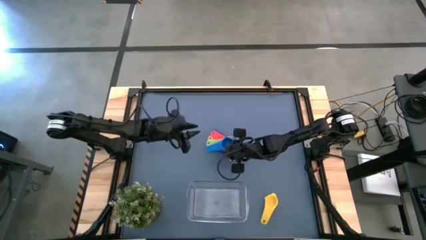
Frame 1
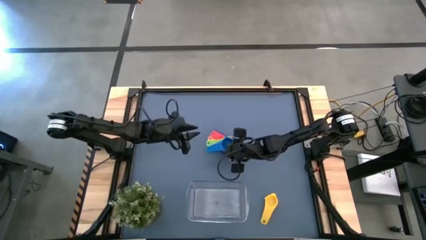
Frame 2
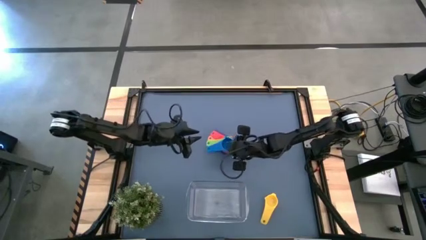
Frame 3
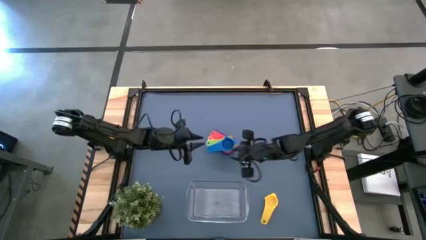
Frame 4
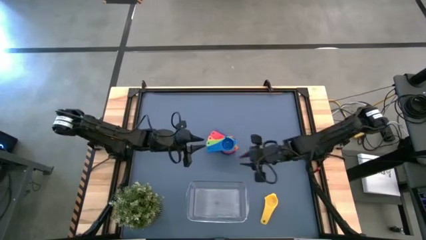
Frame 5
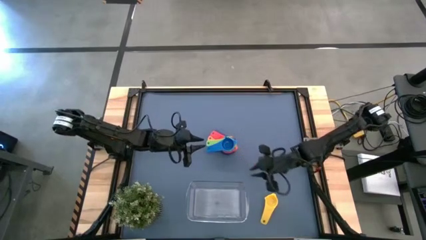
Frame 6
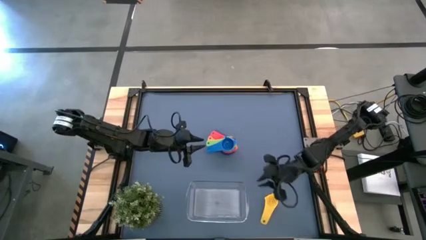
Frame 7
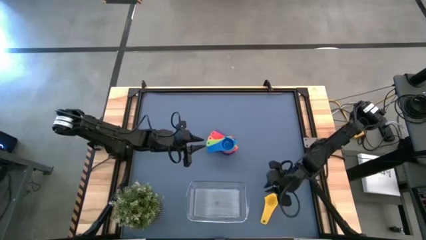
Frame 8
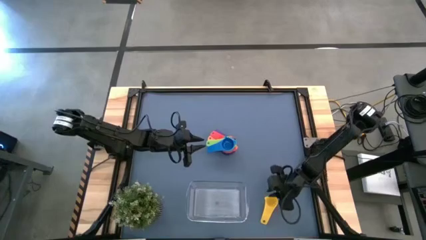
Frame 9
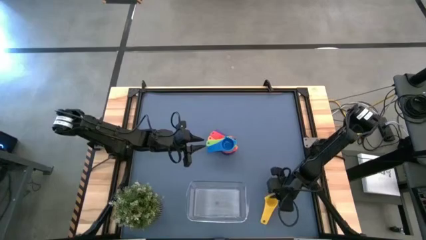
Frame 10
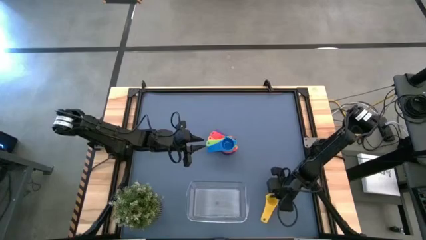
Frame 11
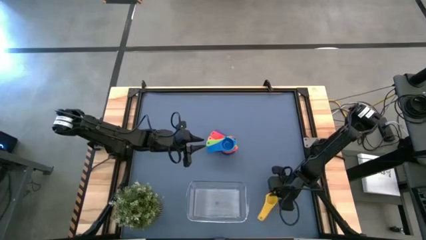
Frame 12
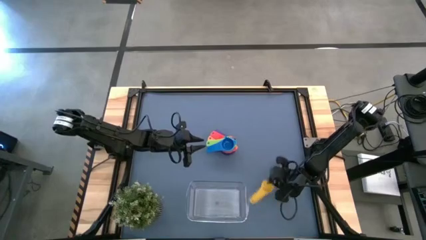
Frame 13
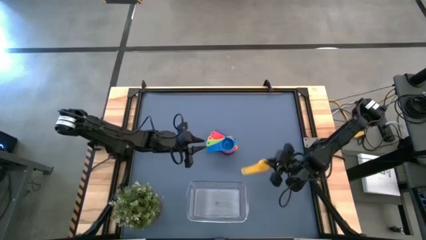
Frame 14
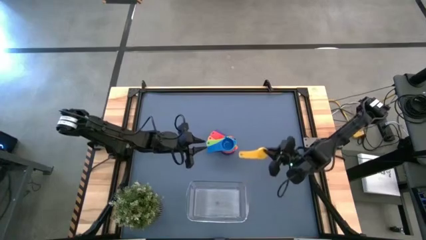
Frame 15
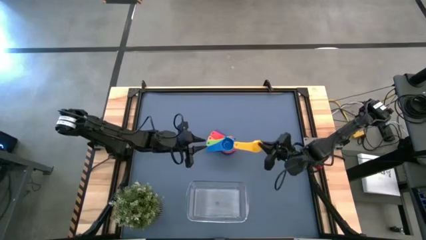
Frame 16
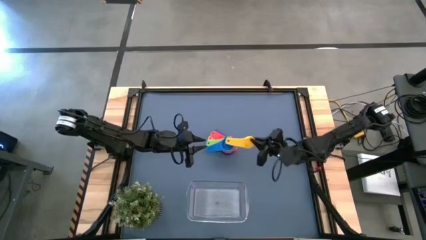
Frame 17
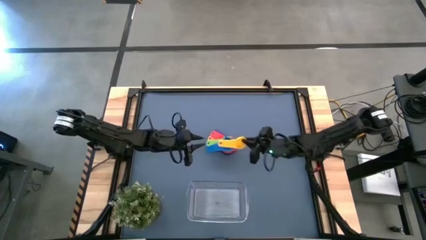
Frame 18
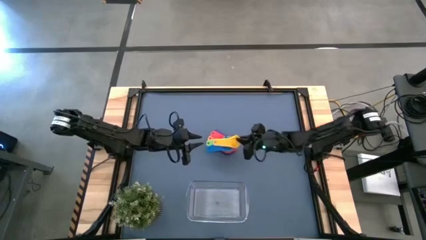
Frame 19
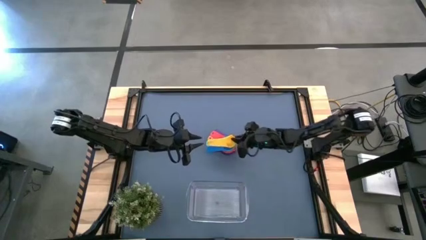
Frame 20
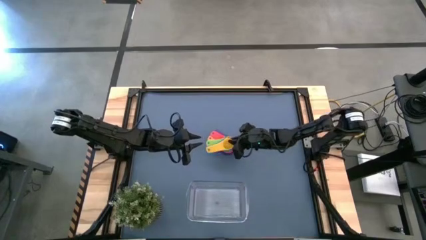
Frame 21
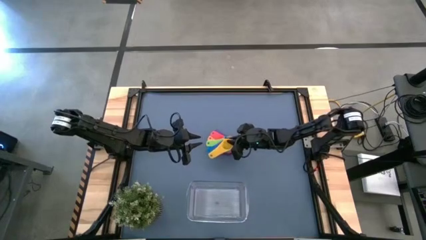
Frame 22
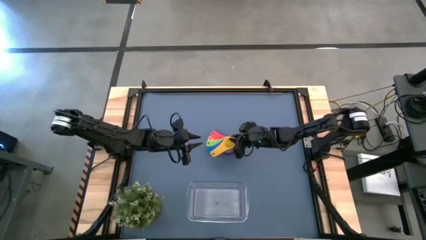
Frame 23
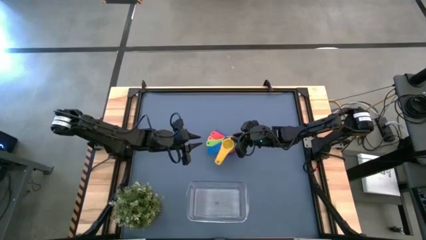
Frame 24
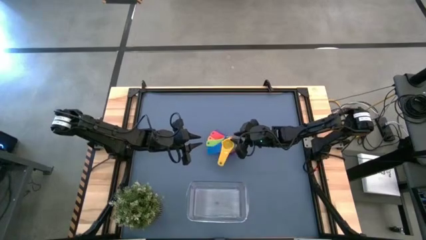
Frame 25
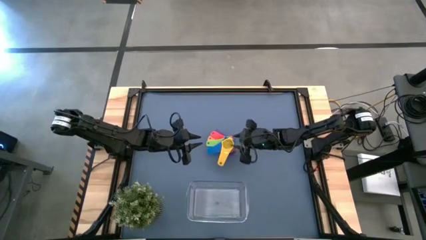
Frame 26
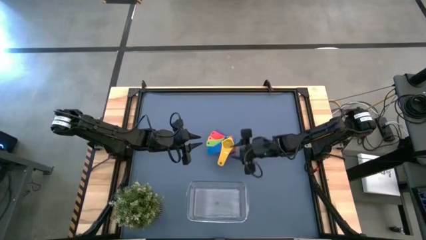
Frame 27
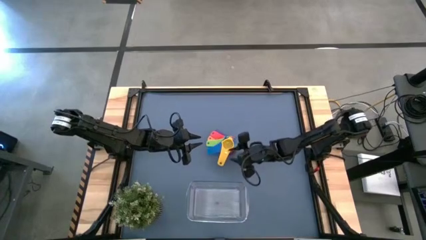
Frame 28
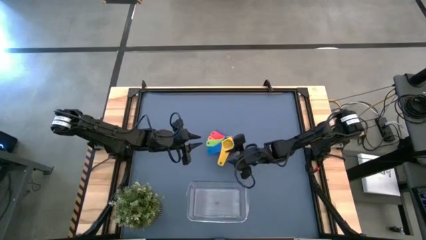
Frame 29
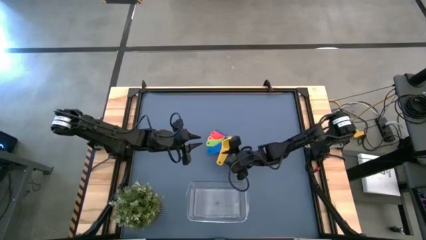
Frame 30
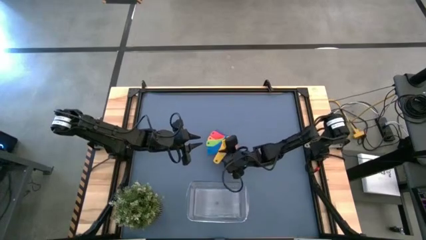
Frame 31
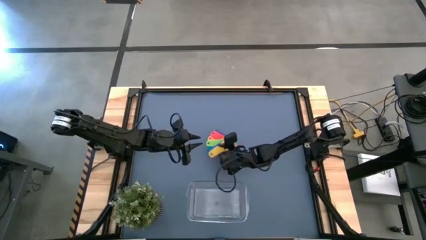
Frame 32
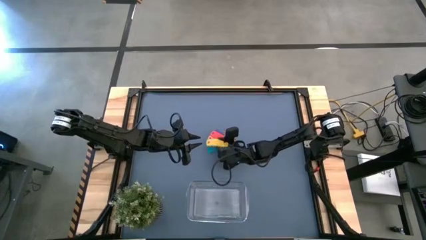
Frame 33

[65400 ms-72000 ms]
Task: Nest measuring cups in basket
Stack the yellow measuring cup on top of the blue measuring cup

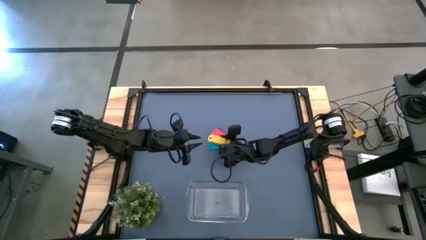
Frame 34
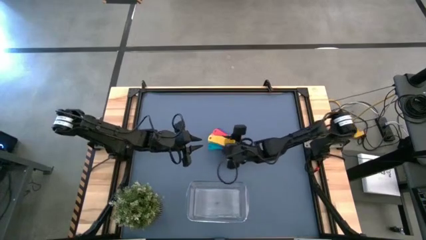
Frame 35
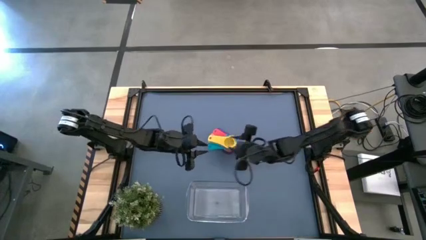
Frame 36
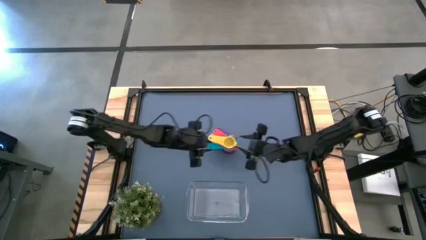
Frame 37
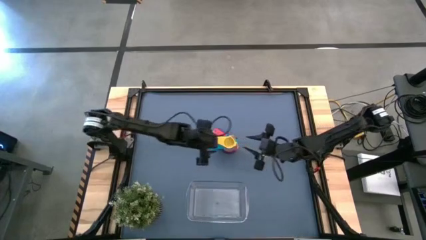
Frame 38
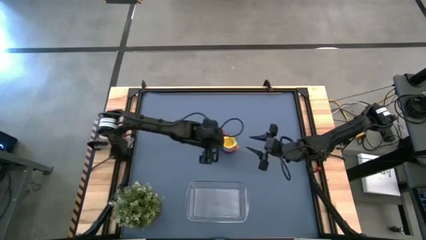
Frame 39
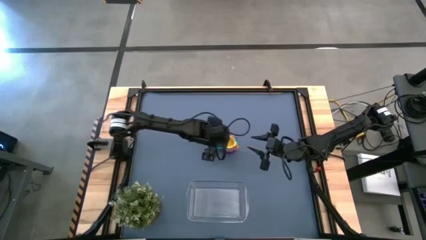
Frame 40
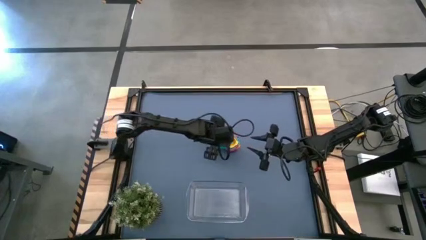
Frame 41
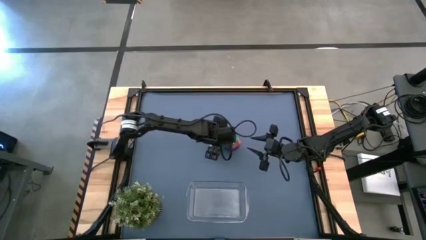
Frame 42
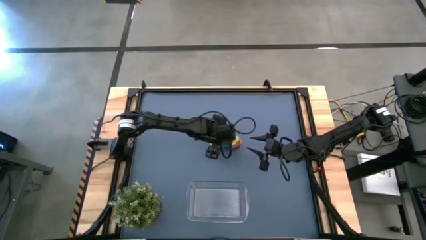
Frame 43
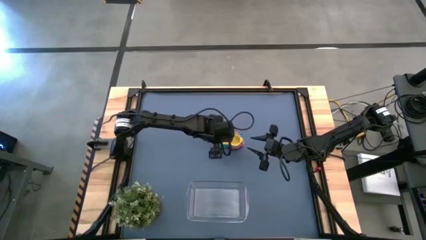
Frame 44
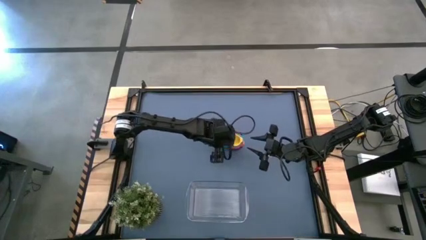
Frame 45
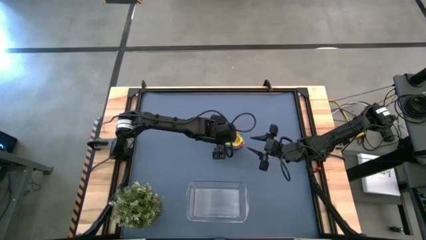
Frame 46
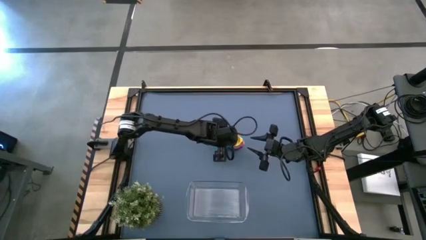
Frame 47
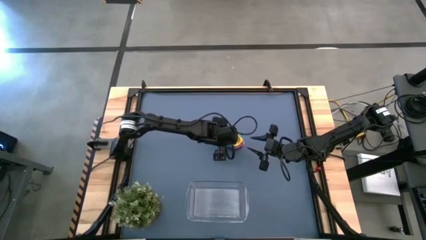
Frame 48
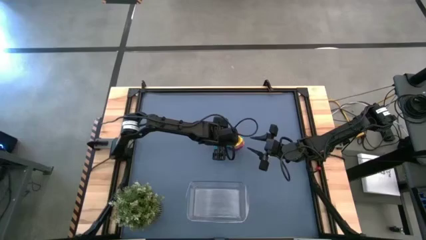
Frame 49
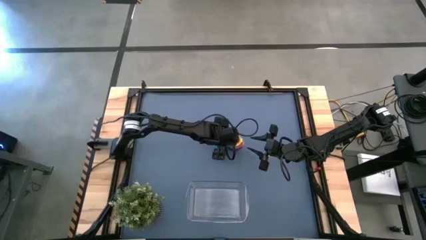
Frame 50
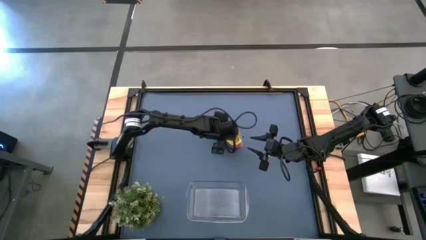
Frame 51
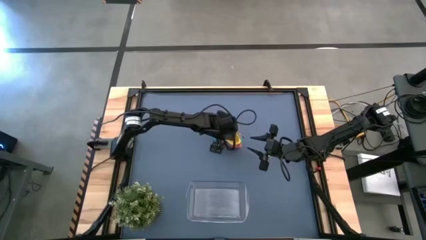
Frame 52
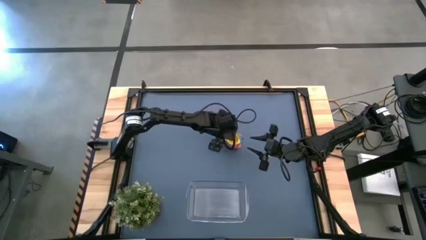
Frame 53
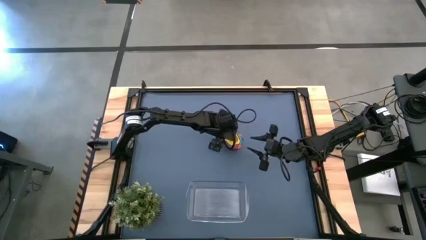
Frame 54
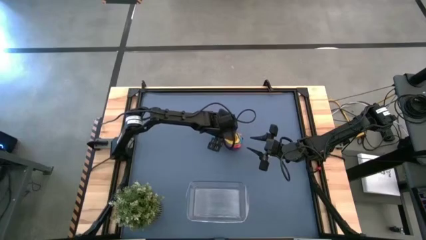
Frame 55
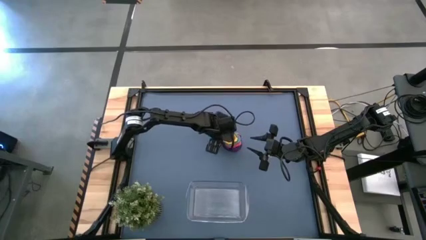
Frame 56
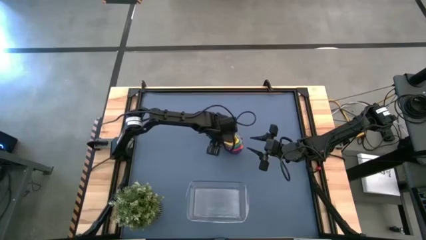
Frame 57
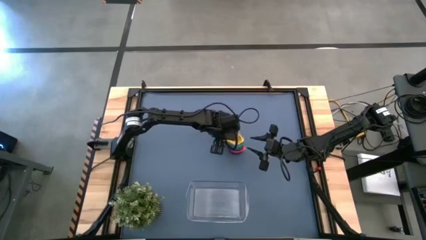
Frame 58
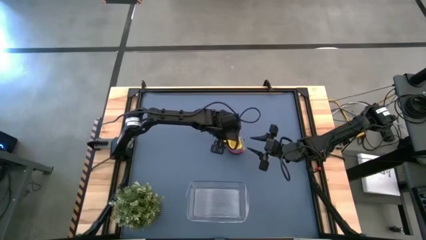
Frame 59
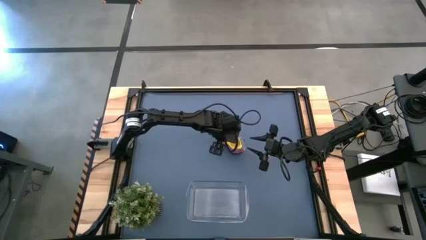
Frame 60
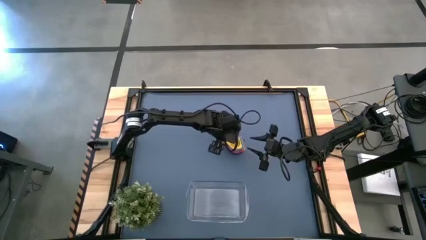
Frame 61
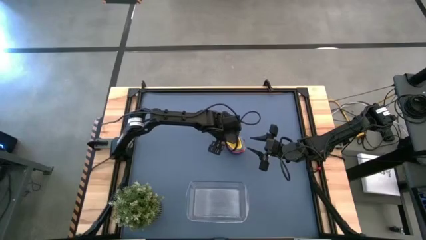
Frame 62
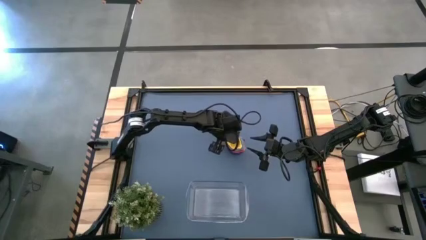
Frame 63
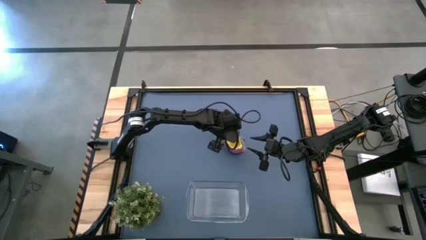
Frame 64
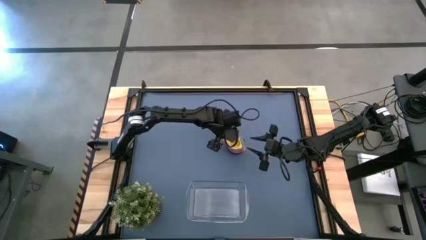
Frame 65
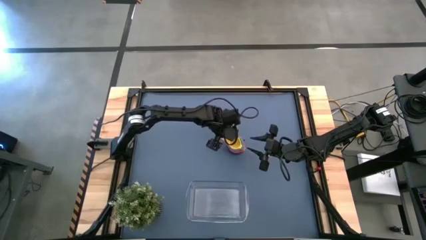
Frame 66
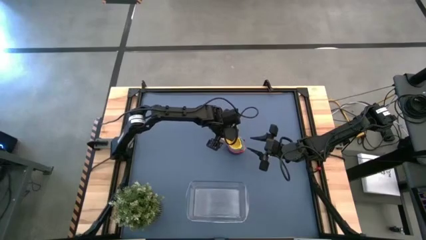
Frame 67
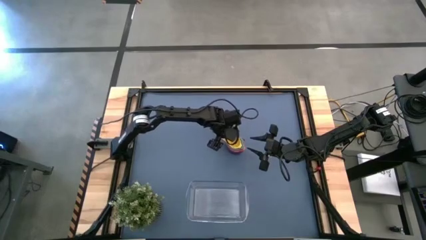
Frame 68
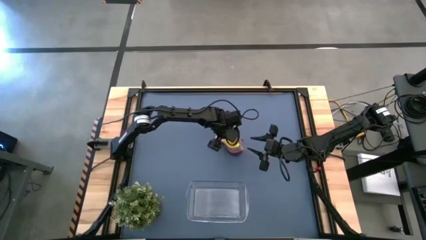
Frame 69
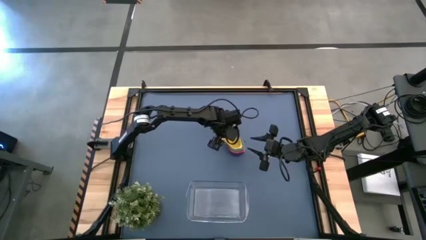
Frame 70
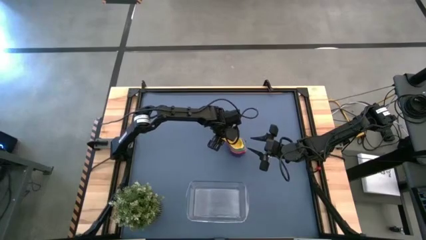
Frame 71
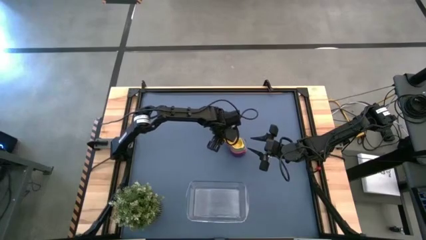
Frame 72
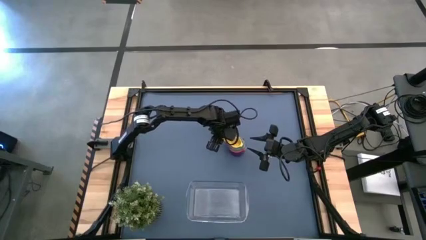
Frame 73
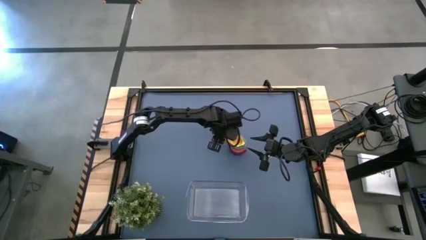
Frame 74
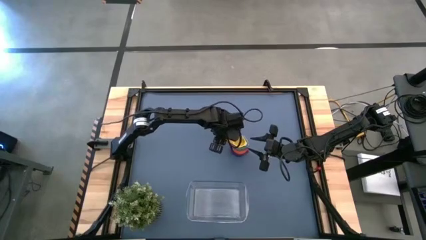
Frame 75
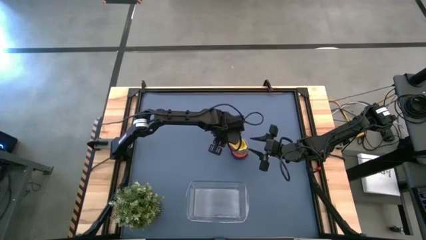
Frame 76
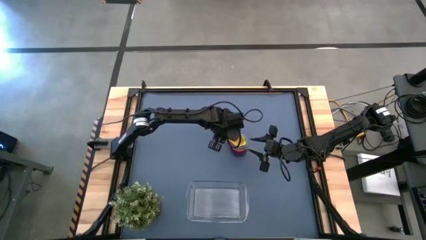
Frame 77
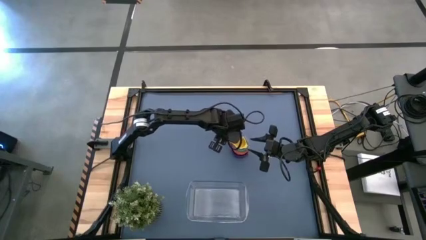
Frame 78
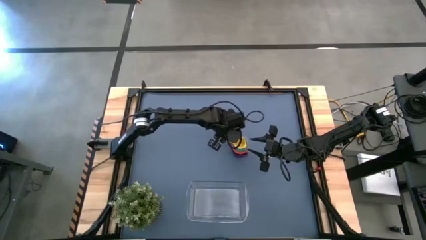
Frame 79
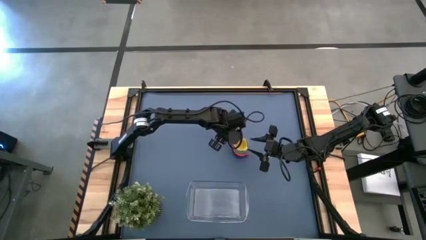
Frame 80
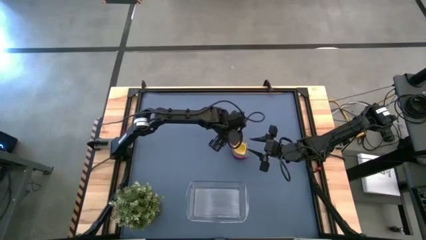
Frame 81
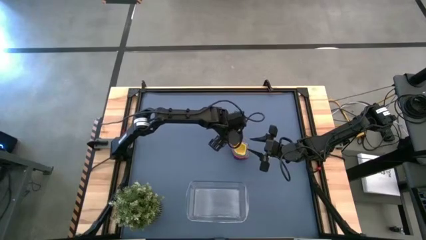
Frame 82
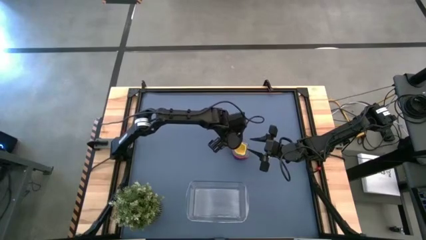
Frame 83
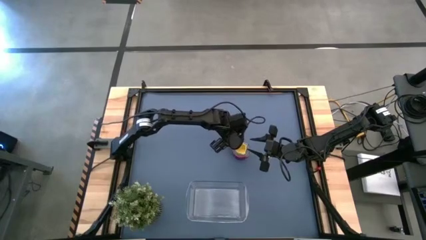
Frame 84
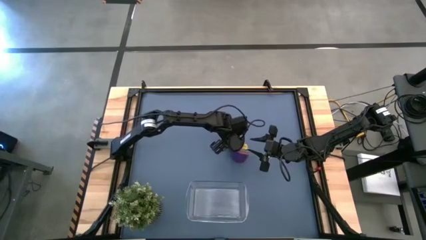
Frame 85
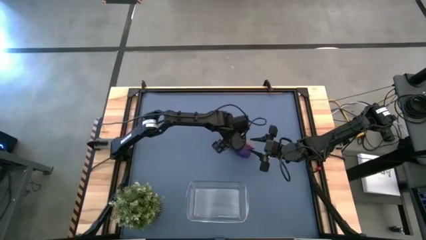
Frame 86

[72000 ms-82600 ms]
Put the stacked measuring cups into the transparent bin
